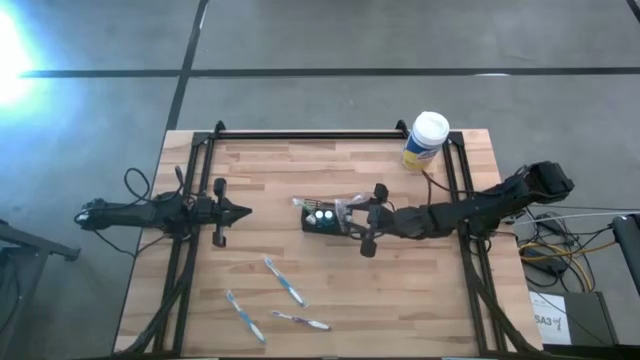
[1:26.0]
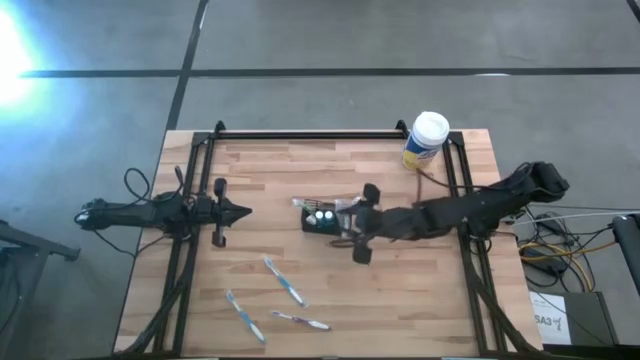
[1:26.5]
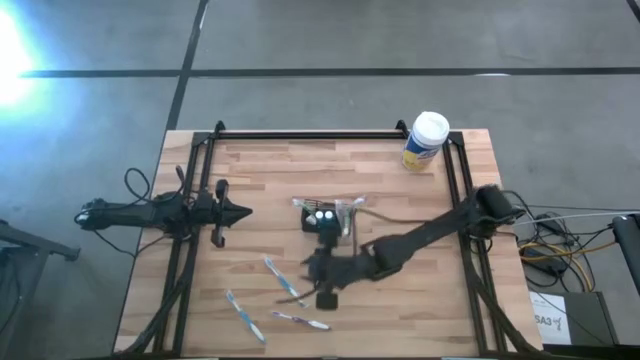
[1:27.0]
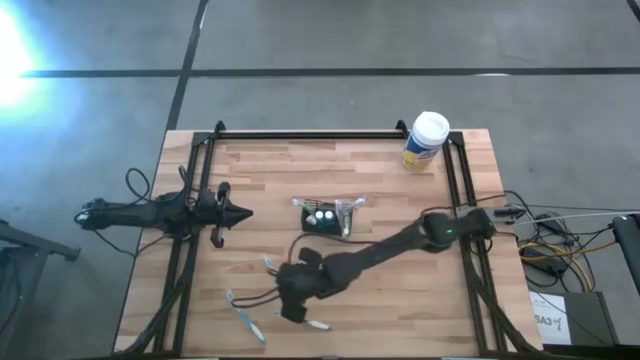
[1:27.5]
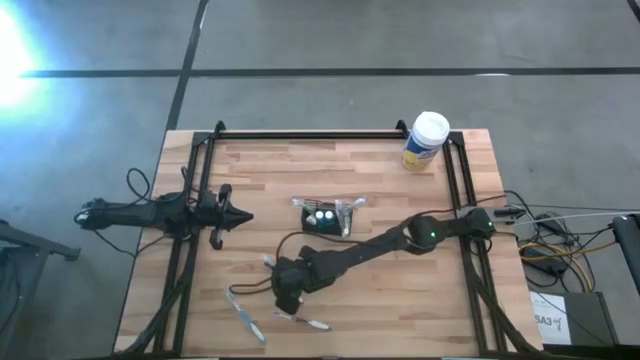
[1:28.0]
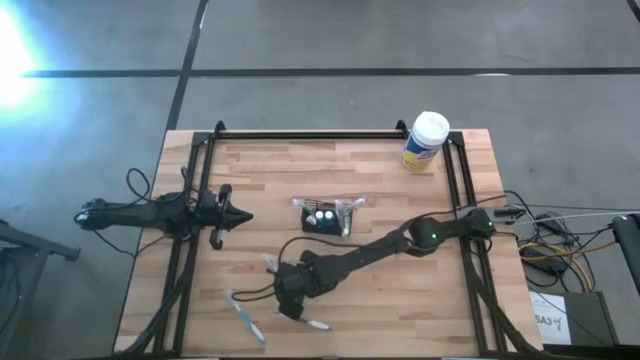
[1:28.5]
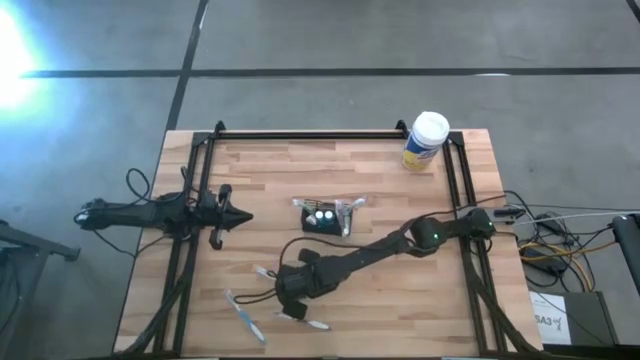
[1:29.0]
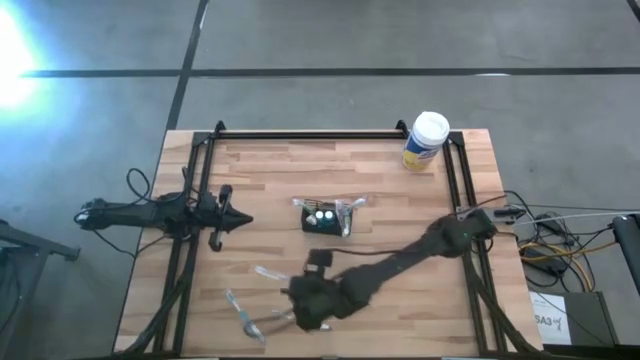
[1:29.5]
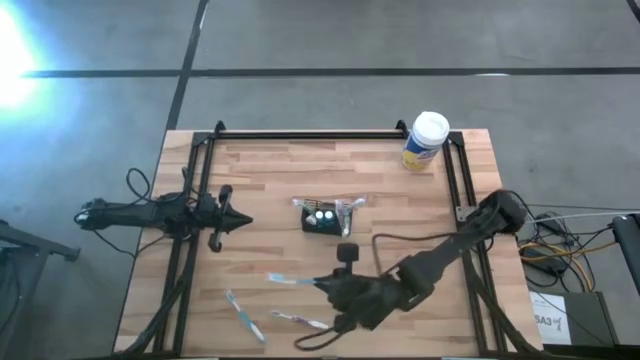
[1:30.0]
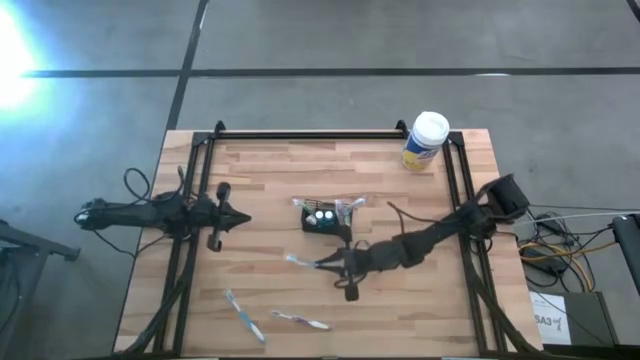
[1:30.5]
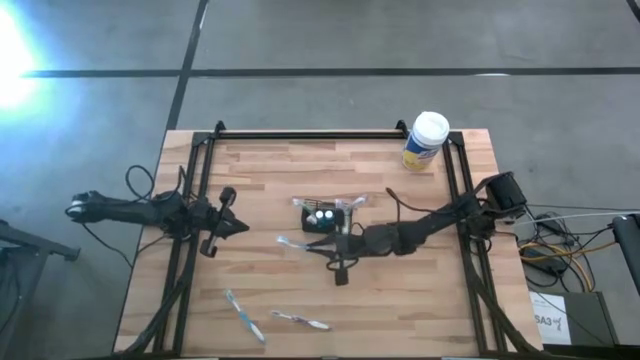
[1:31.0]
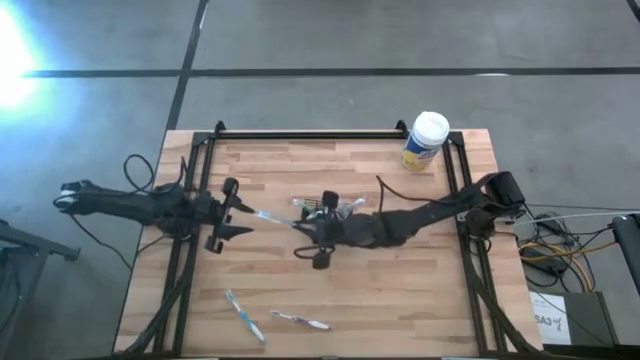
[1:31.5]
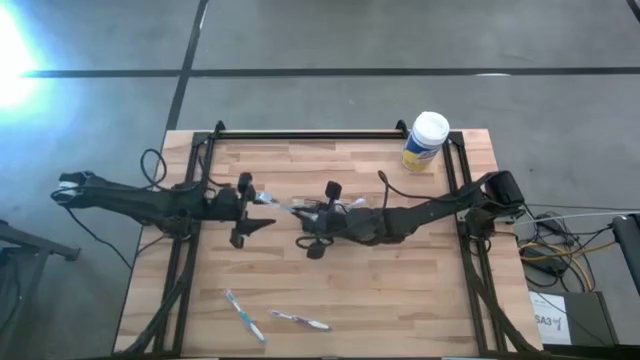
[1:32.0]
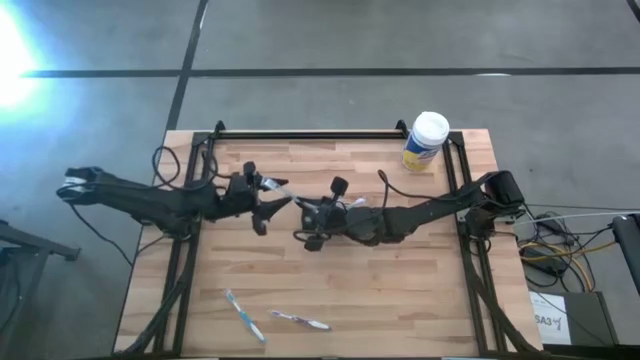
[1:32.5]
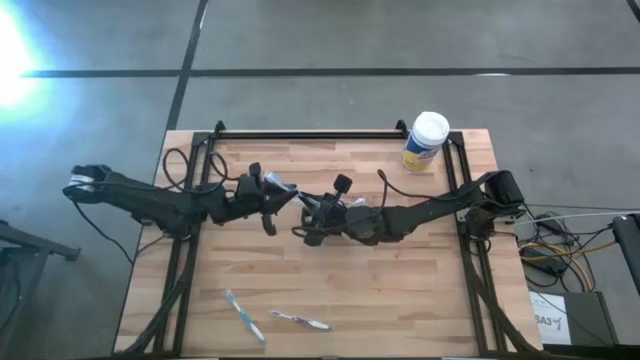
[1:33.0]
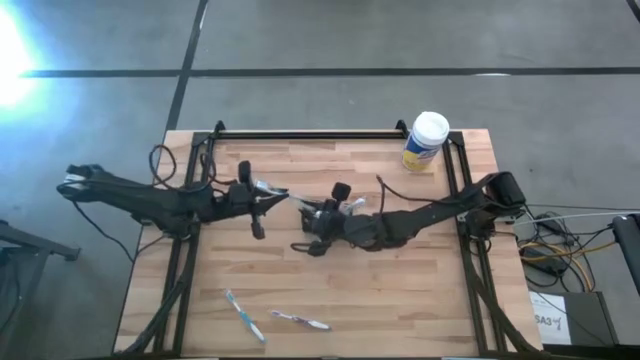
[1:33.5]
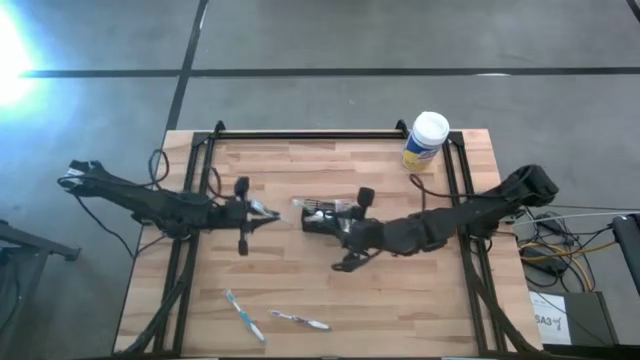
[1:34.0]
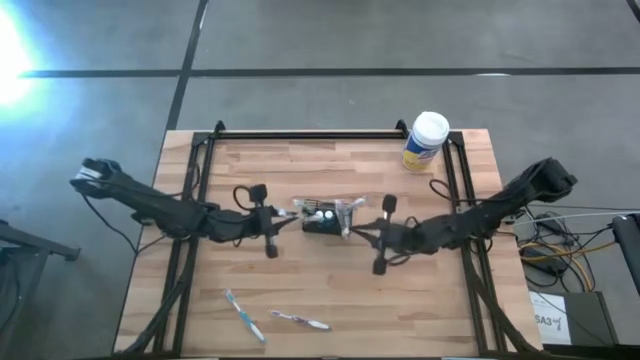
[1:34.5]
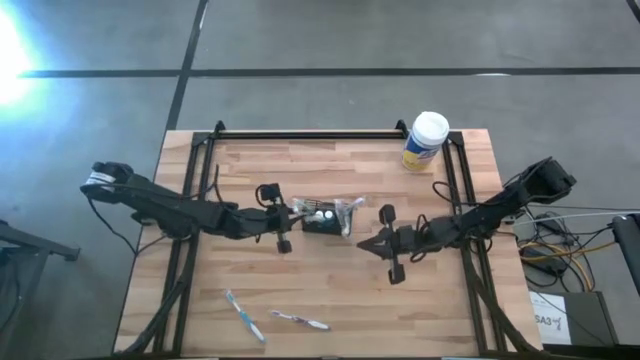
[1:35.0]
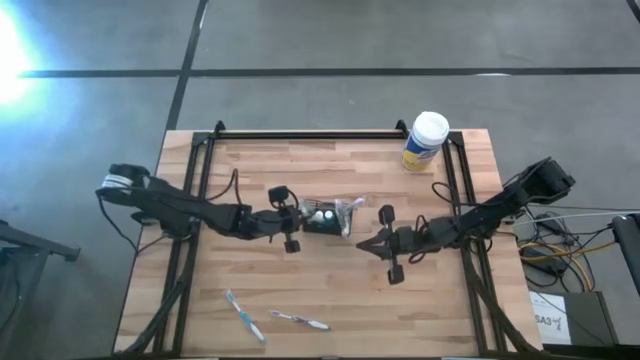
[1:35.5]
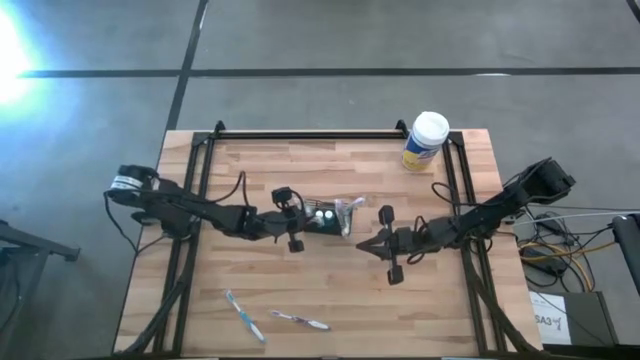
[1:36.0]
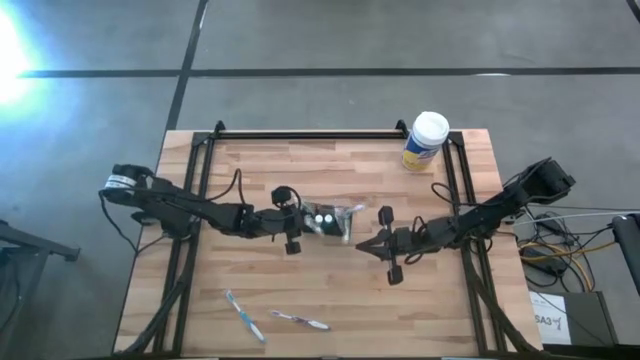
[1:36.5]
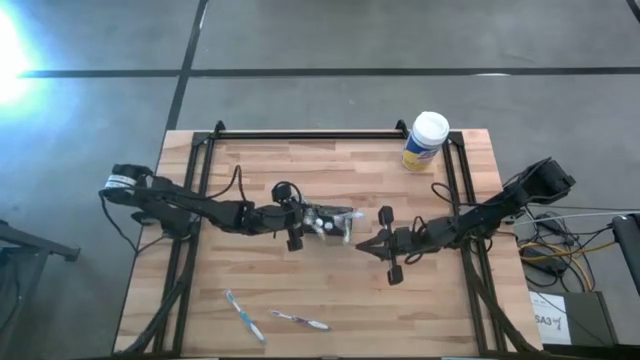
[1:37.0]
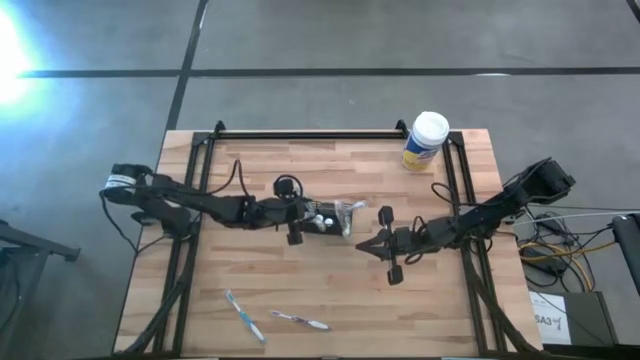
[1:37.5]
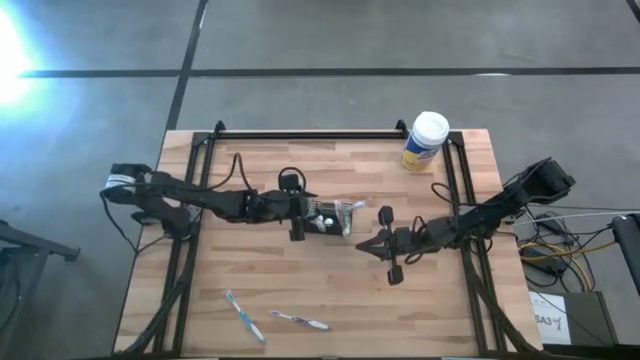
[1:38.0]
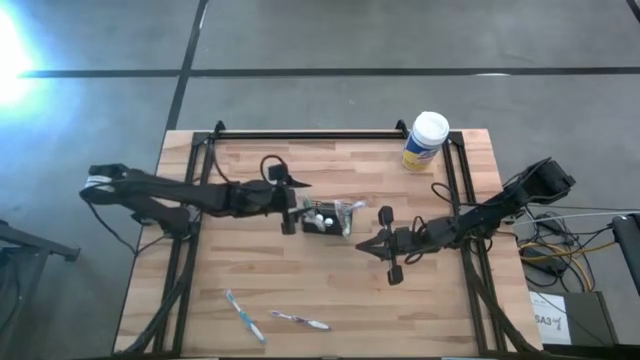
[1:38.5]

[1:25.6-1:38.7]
Task: Pick & Place toothbrushing station
Put the top blue toothbrush into the black mesh organizer

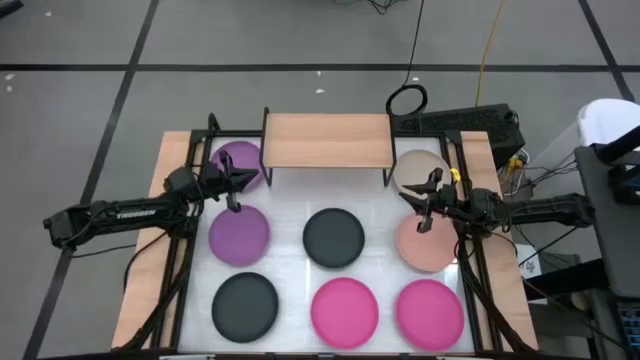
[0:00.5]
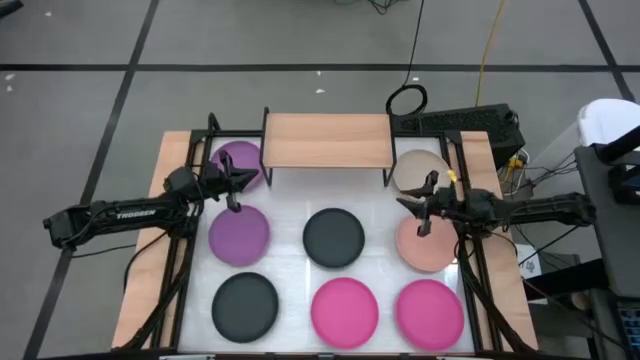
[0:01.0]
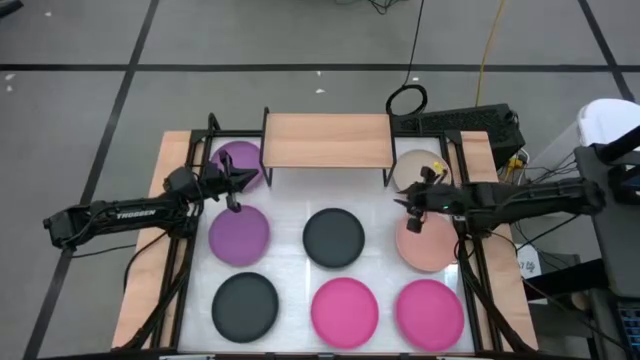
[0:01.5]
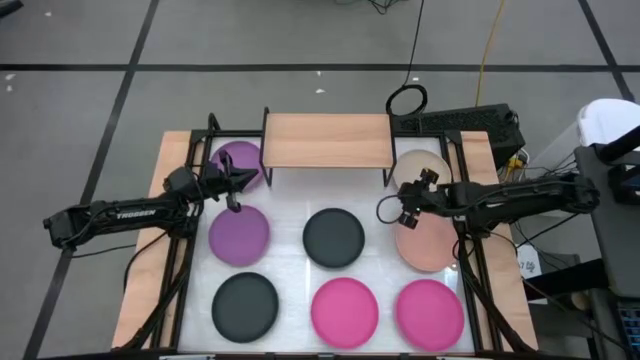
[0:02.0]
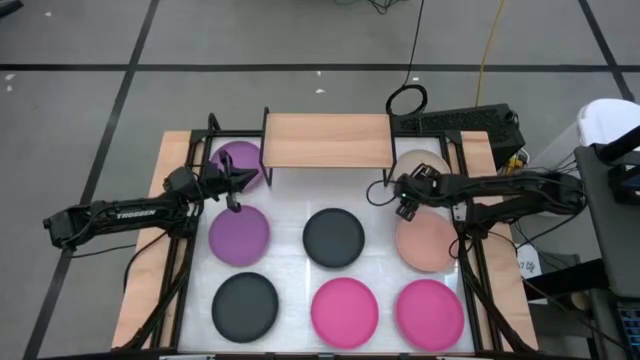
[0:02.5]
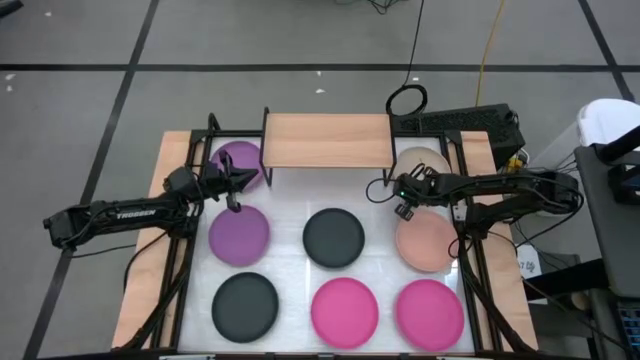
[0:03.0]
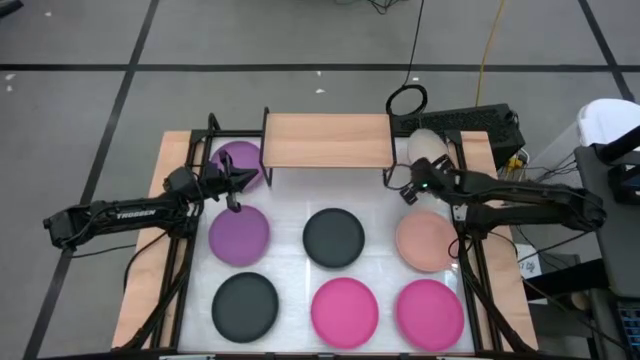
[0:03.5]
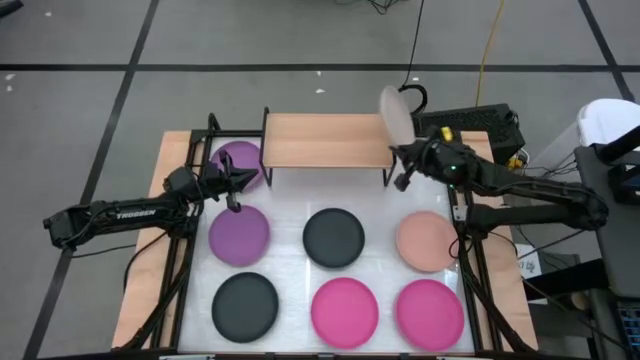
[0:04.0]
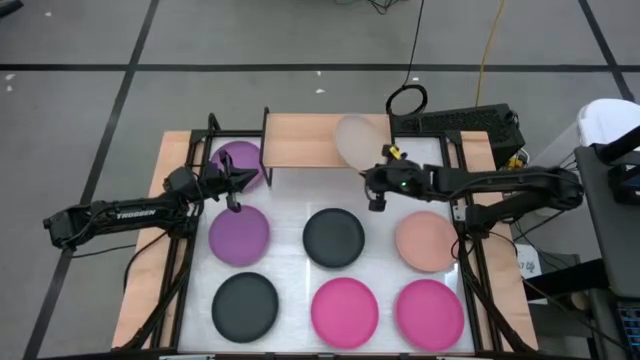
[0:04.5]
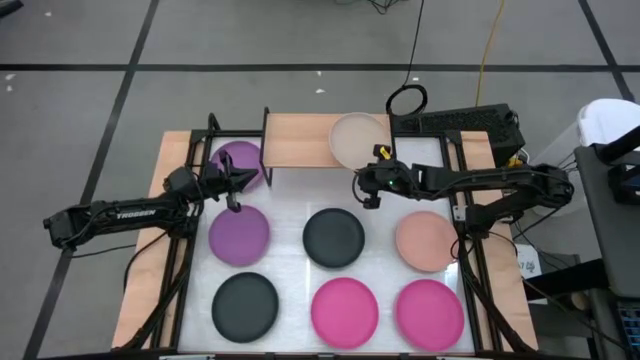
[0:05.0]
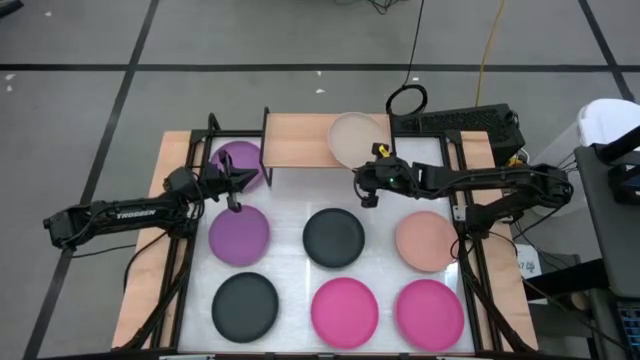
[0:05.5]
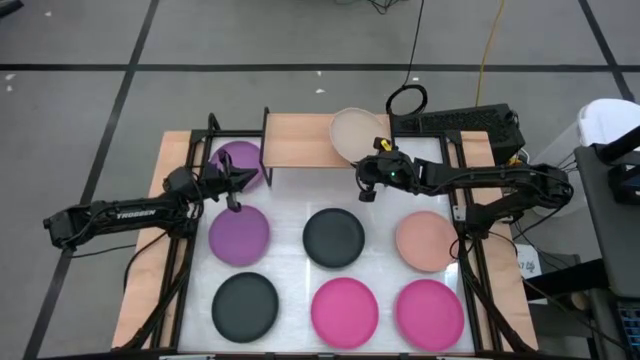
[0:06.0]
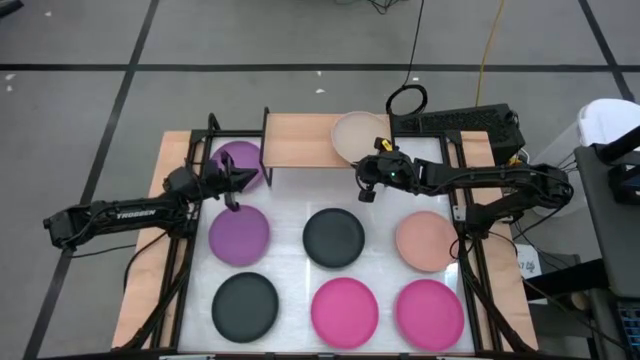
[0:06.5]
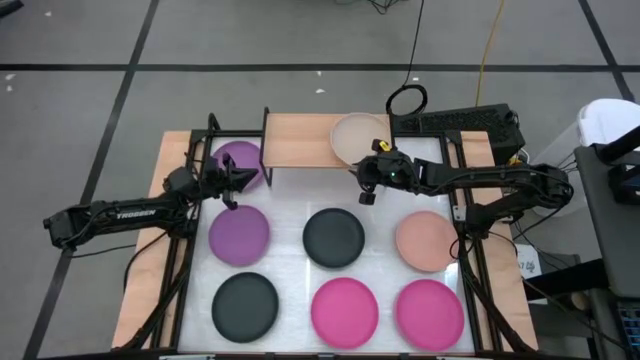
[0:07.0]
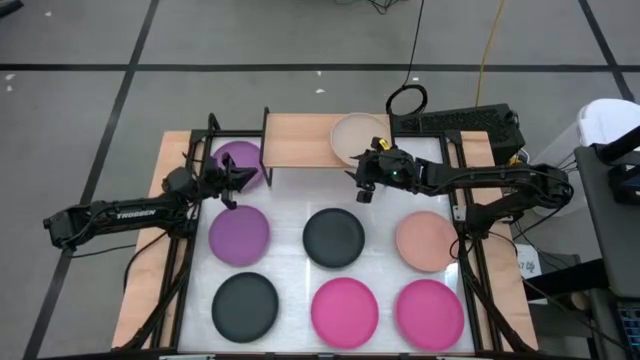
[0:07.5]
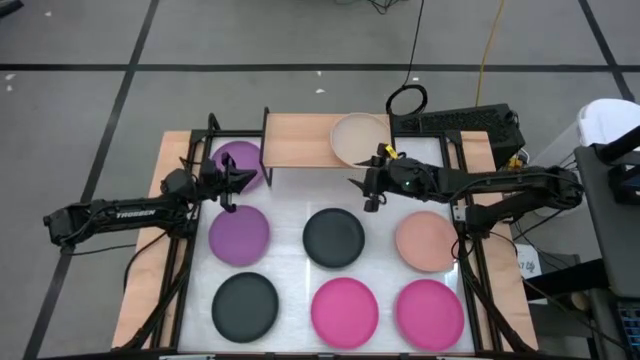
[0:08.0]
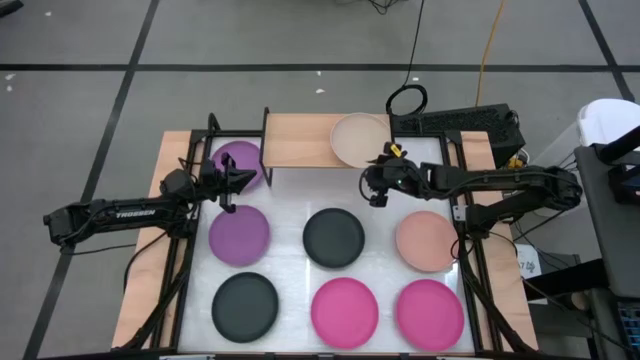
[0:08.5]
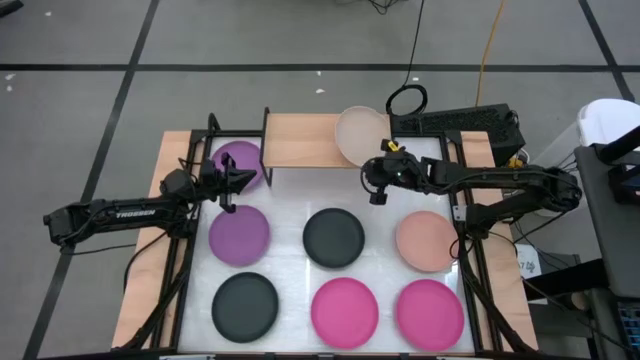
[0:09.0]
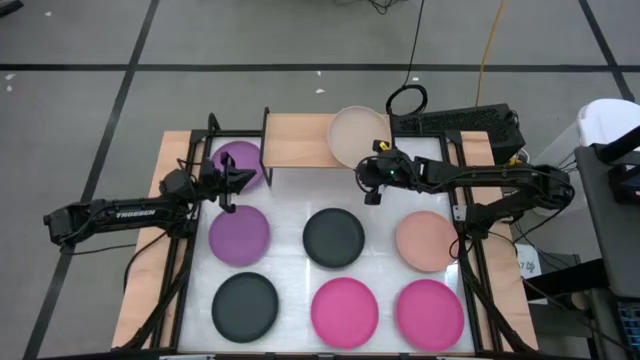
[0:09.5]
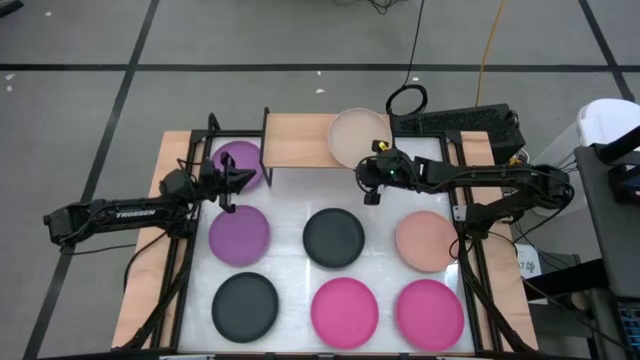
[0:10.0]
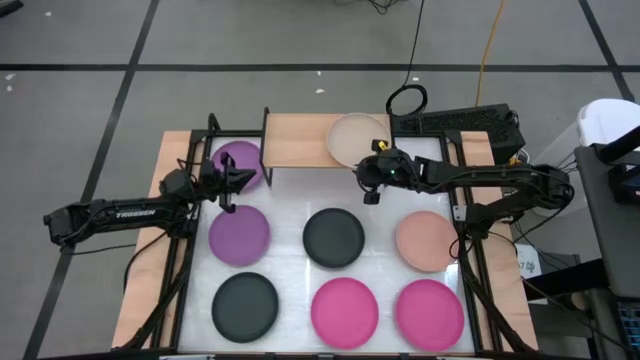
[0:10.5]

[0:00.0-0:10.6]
Task: Place and stack plates onto a shelf
Put the brown plate on the shelf
